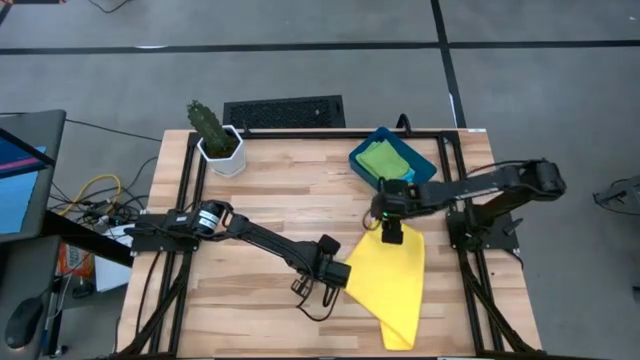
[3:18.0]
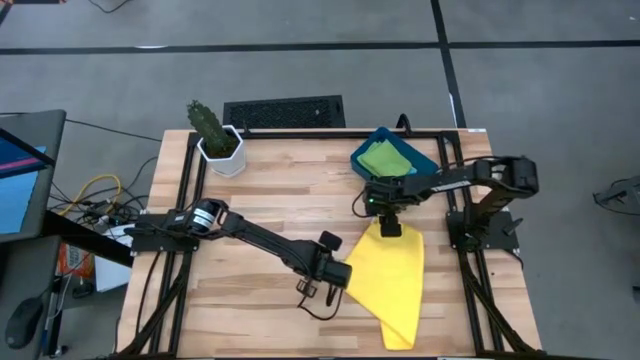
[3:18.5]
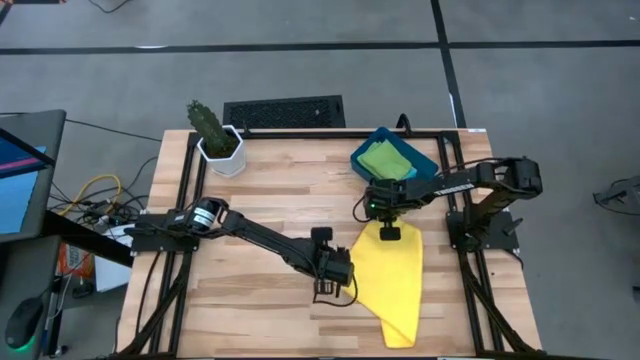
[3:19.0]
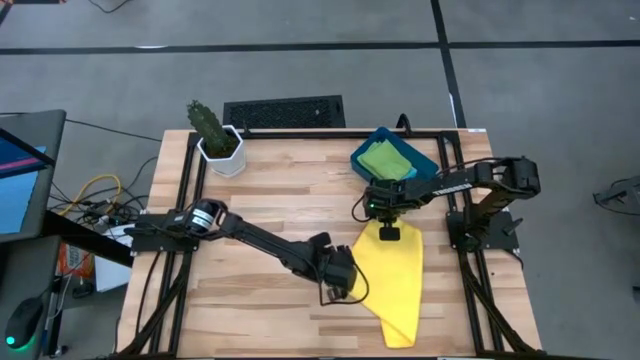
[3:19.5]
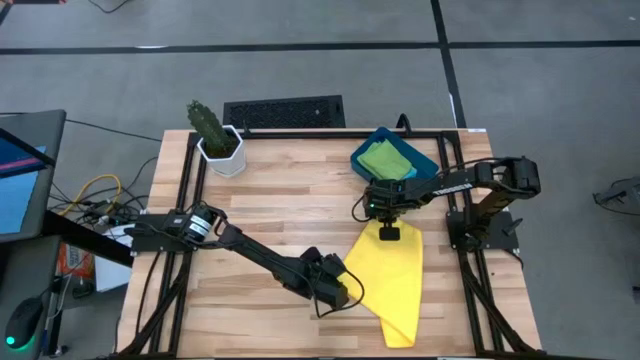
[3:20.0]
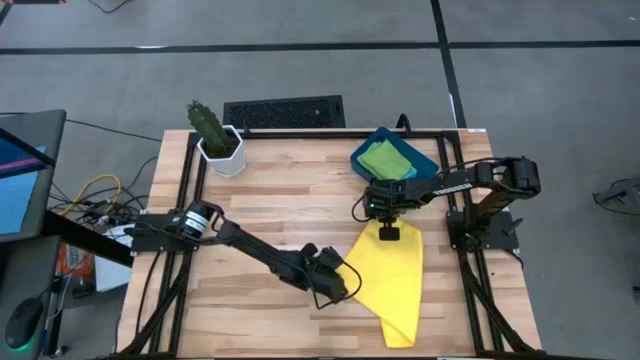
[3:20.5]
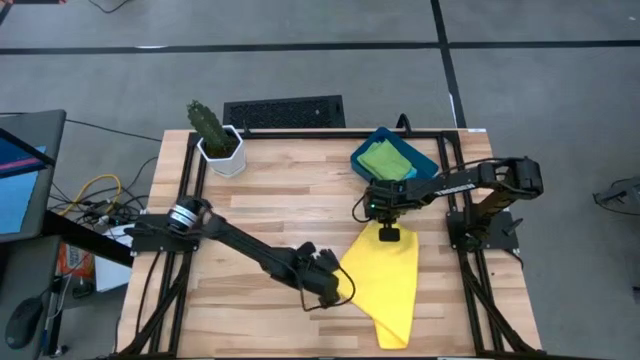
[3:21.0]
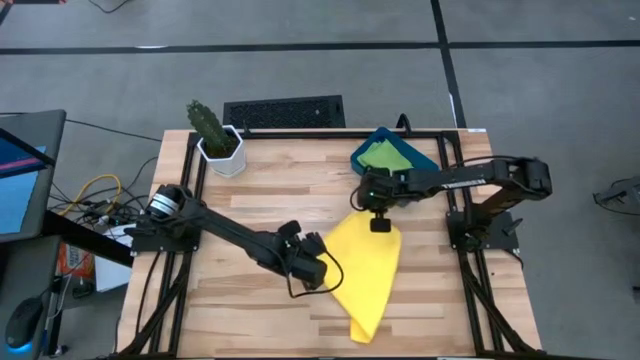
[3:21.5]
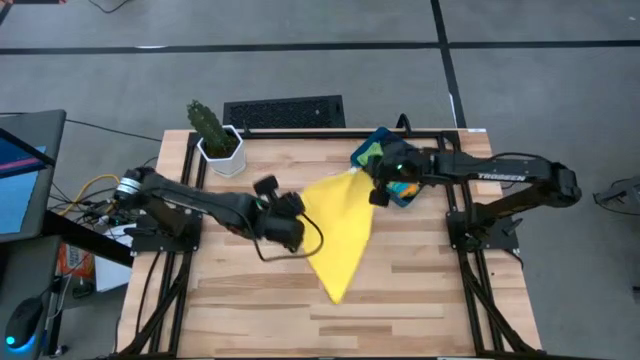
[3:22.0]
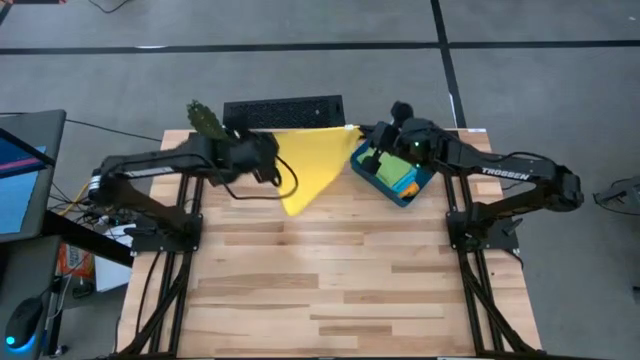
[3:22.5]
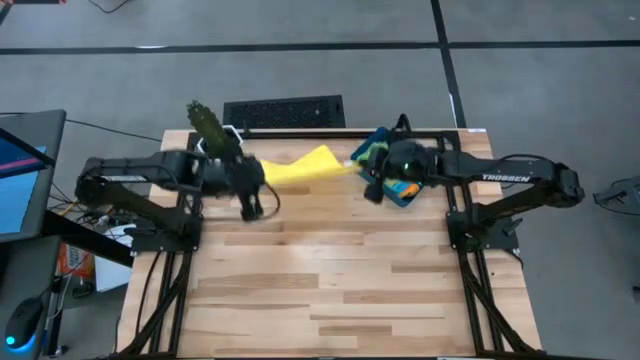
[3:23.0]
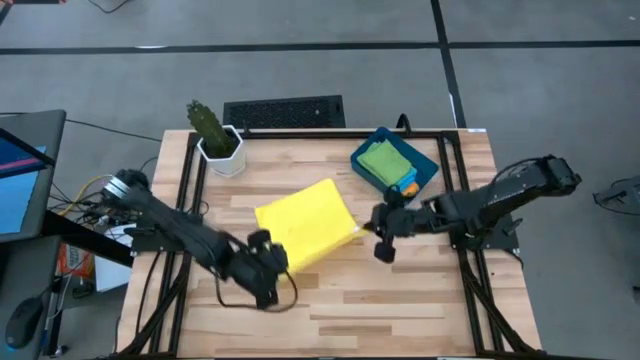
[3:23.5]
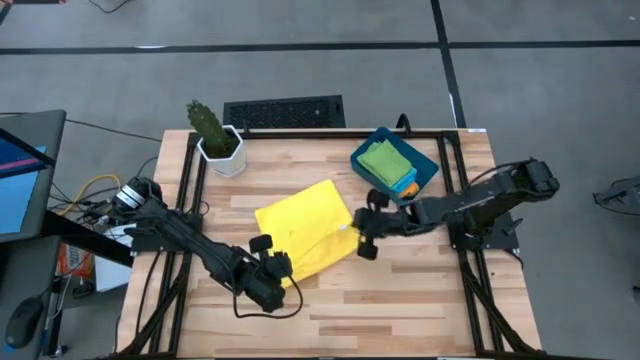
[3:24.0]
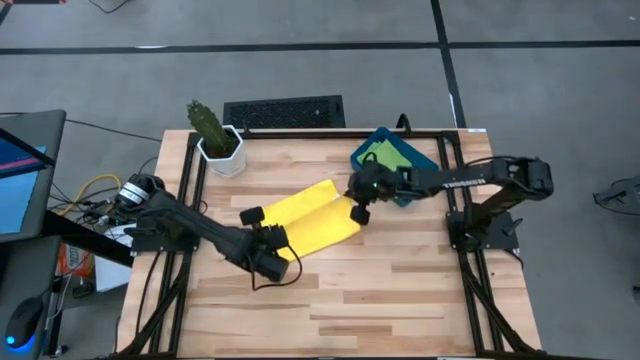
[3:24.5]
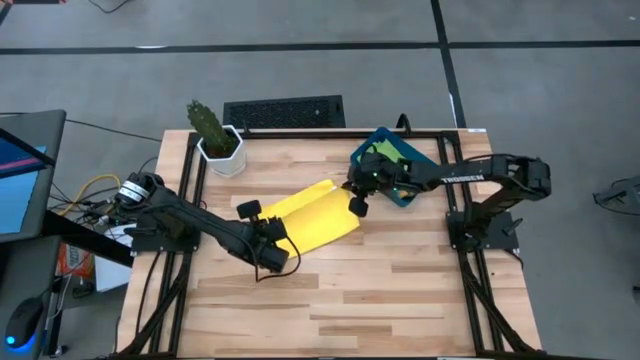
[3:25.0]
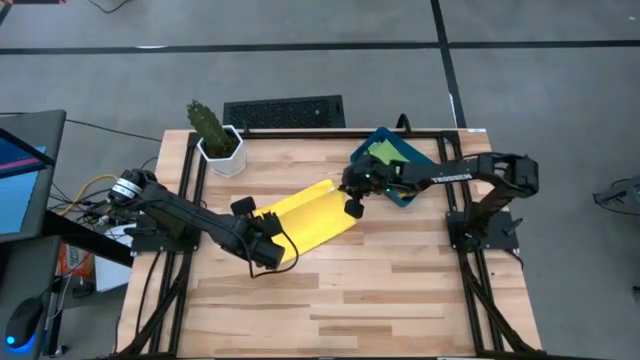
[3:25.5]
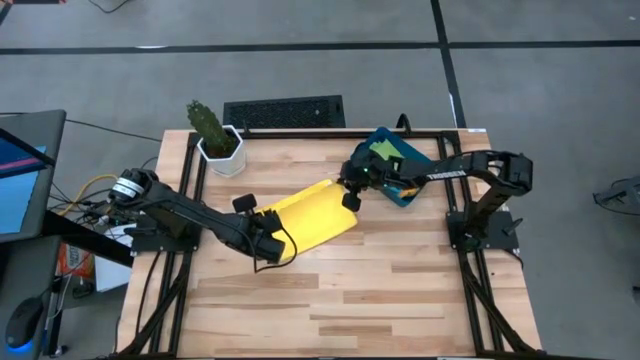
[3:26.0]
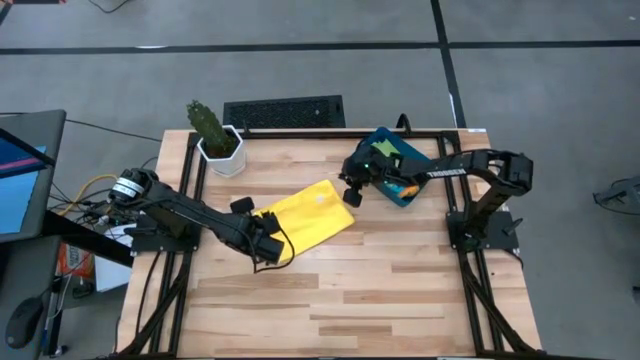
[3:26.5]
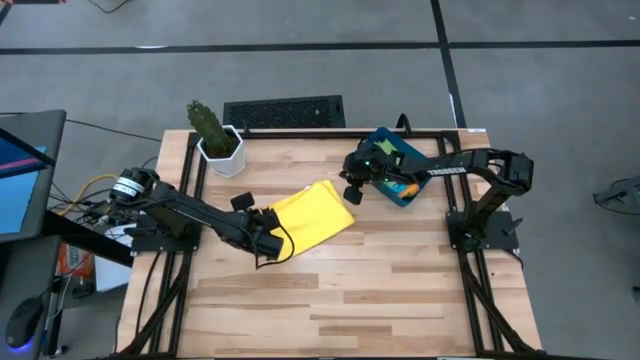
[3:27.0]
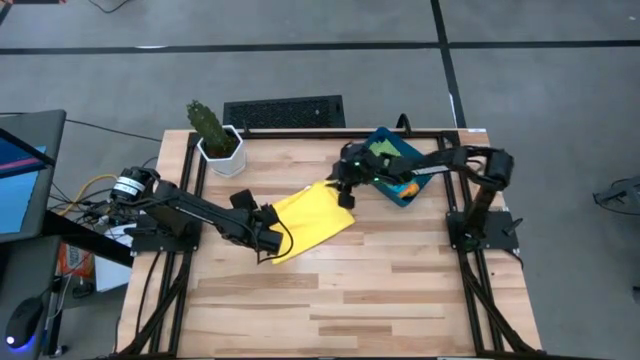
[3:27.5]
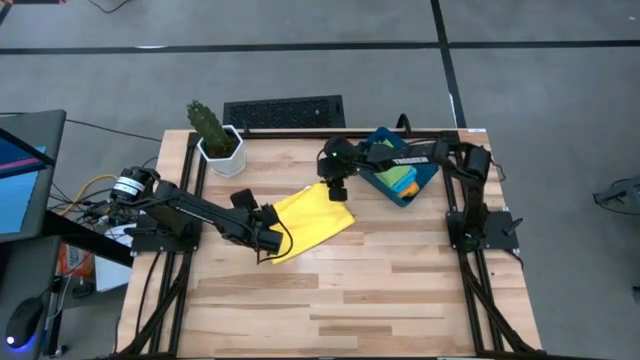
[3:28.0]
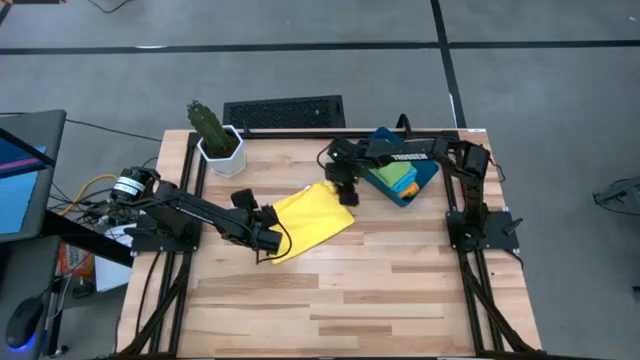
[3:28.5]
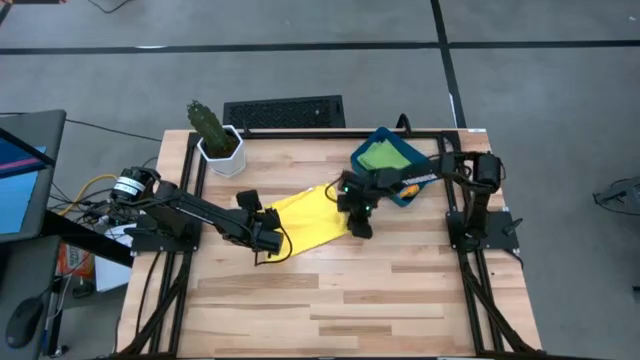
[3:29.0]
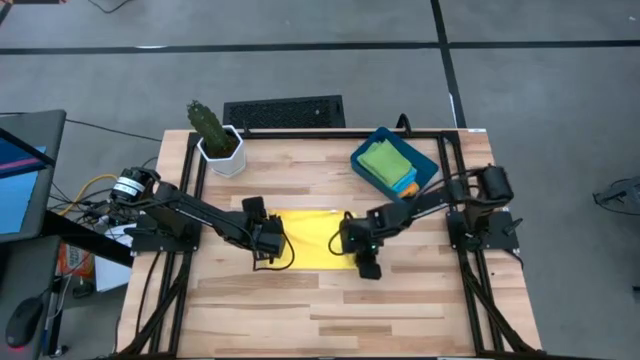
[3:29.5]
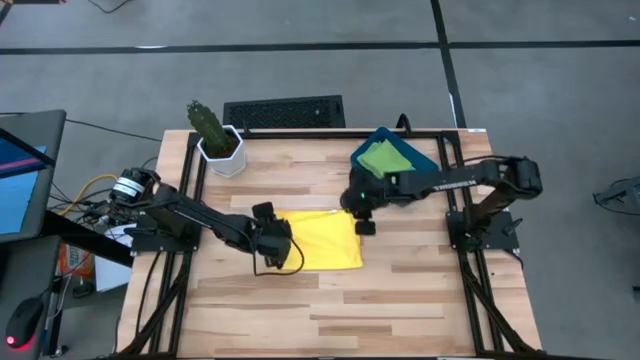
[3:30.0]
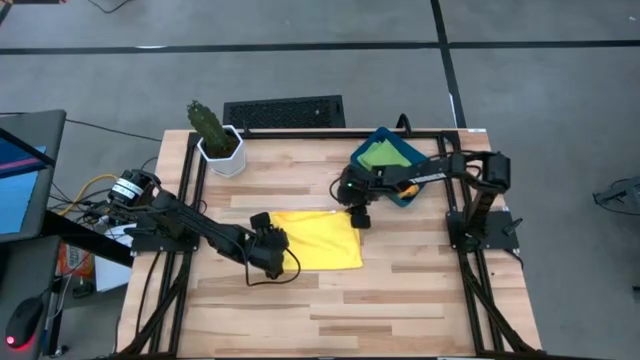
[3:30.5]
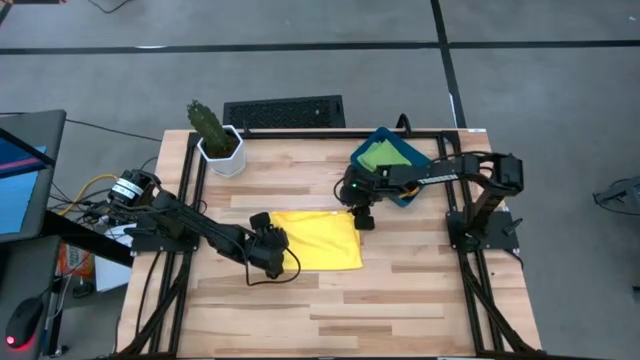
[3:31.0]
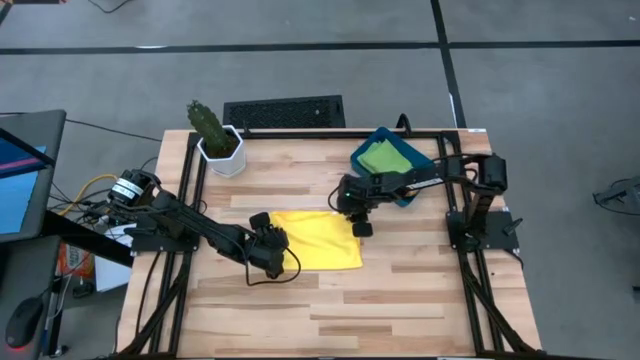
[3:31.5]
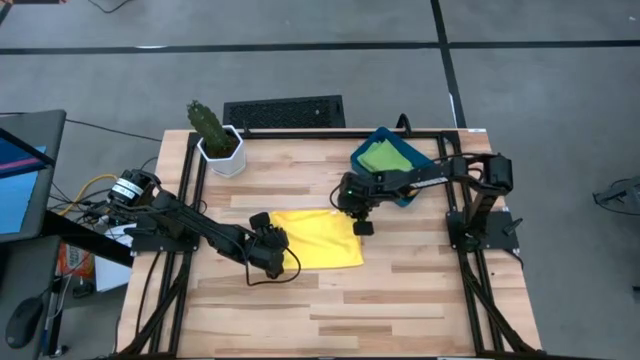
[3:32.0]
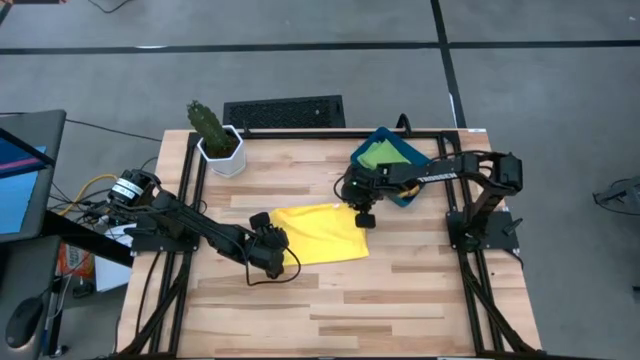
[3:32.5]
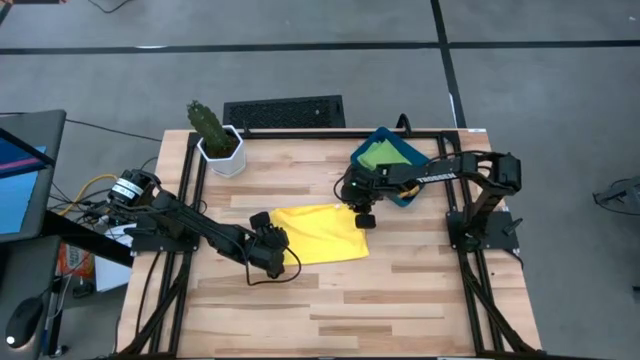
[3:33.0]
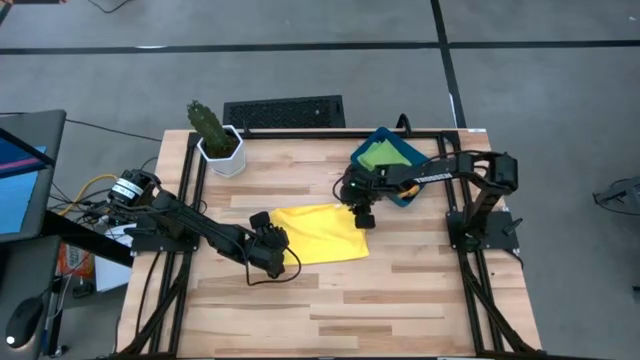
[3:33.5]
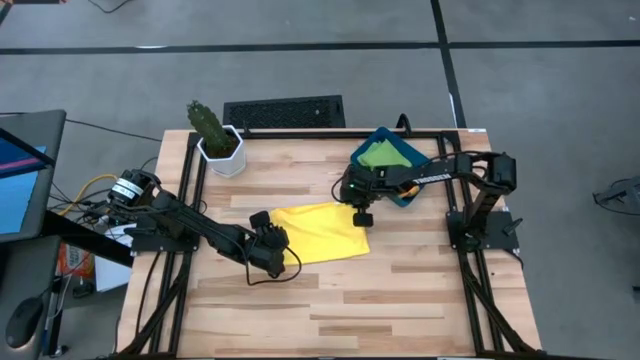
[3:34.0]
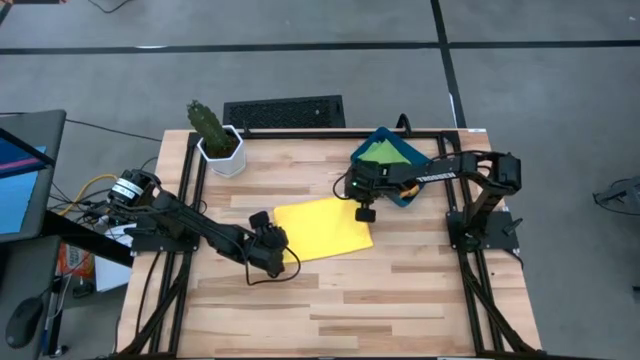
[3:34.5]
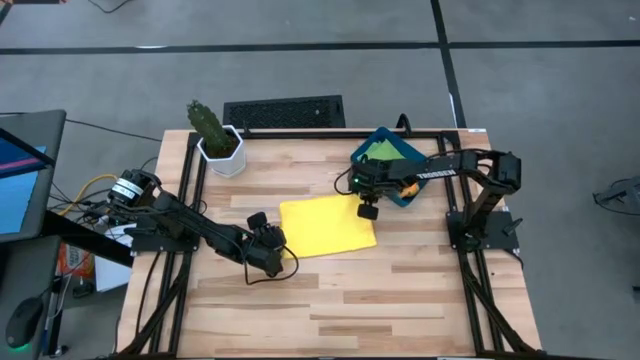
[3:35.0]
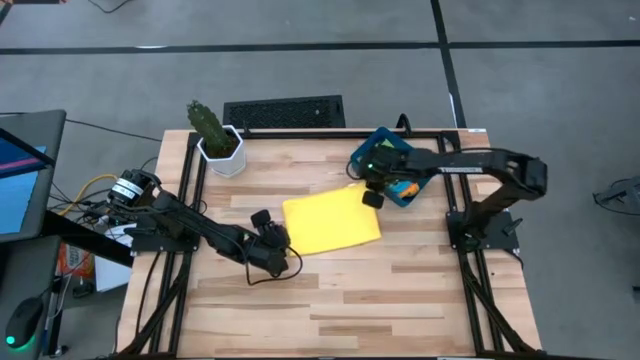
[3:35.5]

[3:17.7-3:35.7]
Task: Fold microfiber towels
Fold the yellow microfiber towel

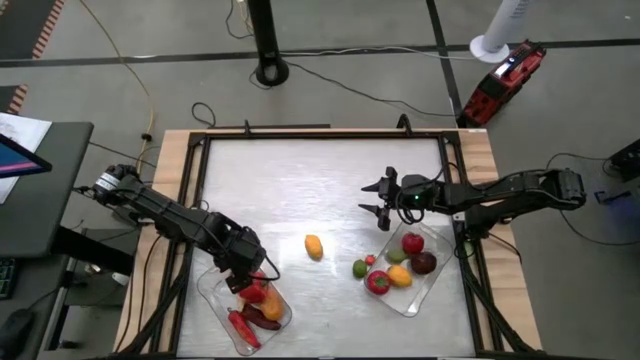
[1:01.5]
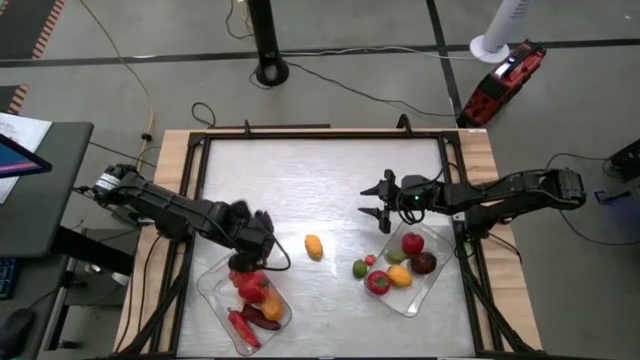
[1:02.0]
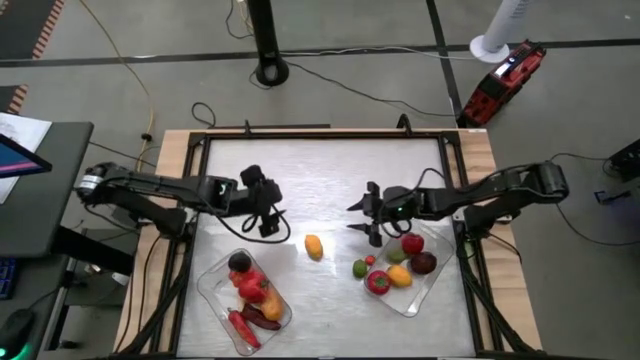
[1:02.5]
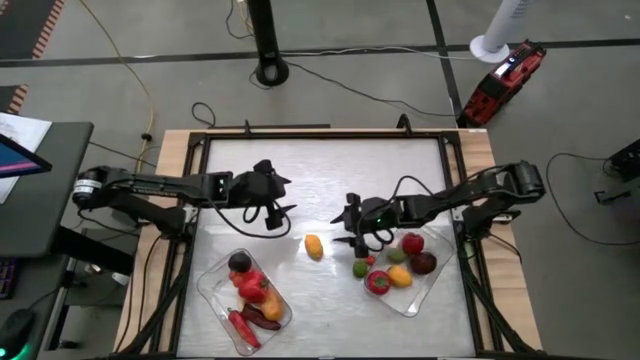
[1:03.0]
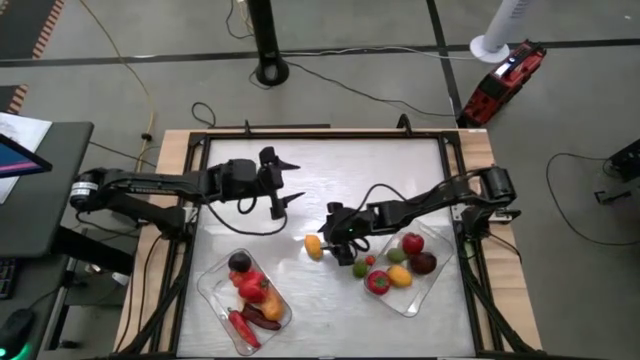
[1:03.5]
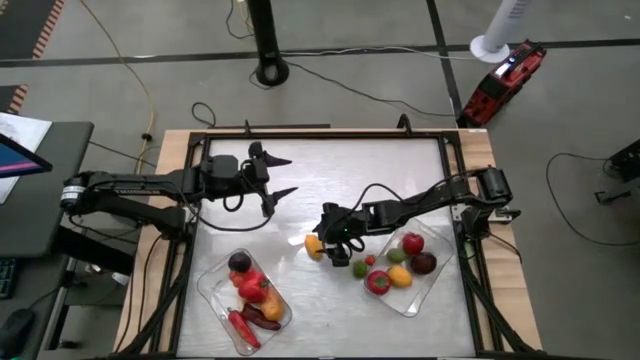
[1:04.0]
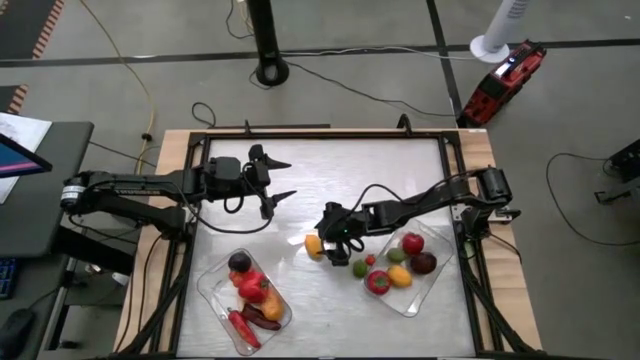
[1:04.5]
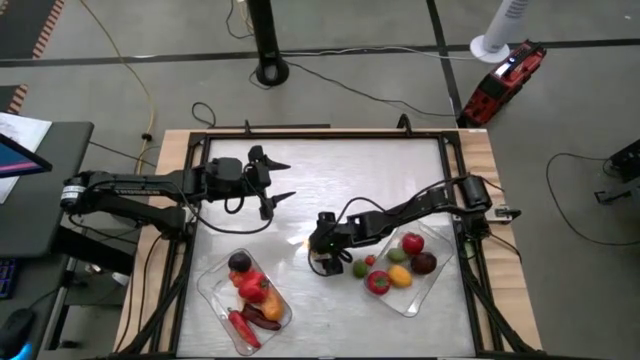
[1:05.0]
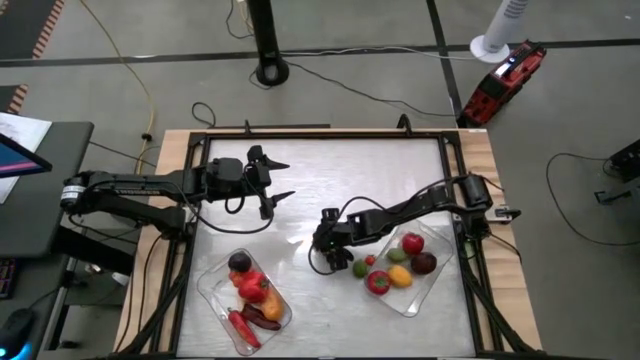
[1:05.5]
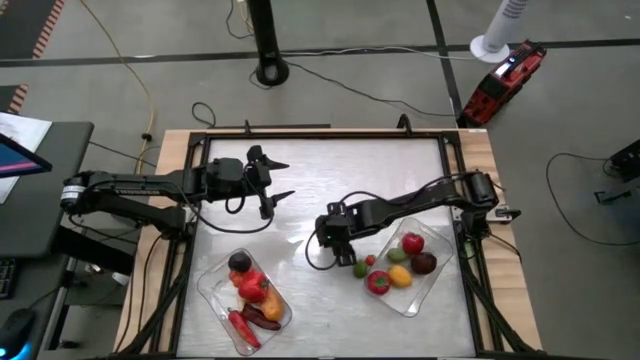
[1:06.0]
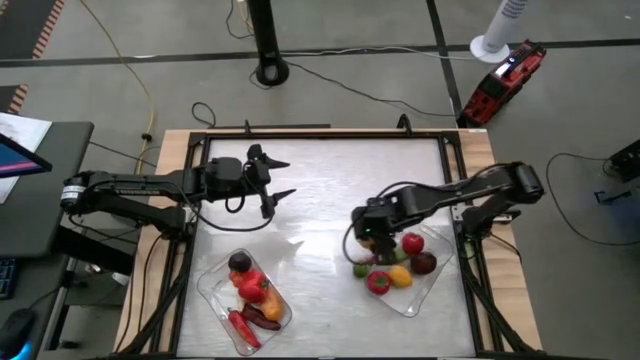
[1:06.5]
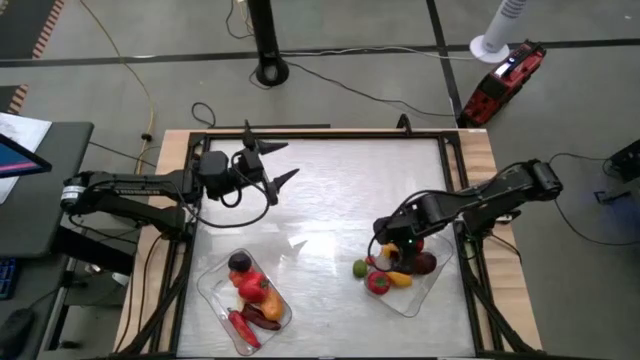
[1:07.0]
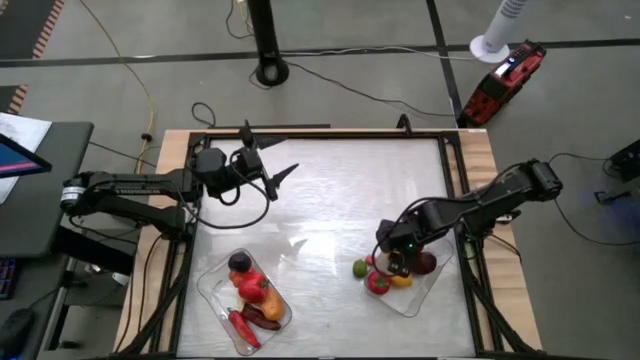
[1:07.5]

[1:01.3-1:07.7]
Task: Sort produce into baskets
Put the yellow lemon into the right transparent bin
